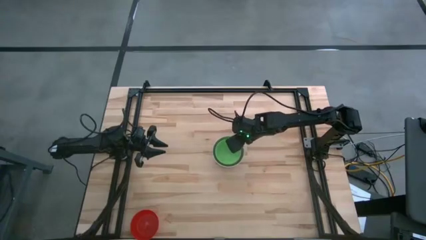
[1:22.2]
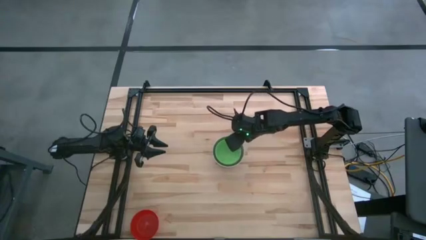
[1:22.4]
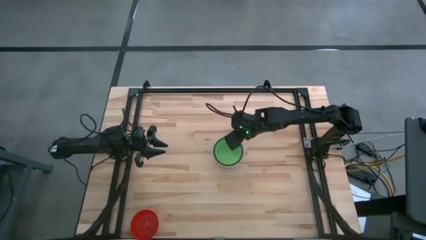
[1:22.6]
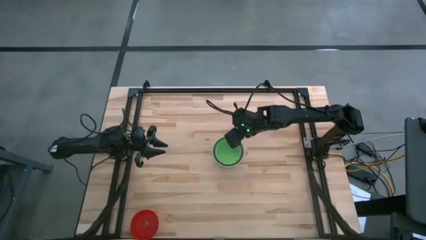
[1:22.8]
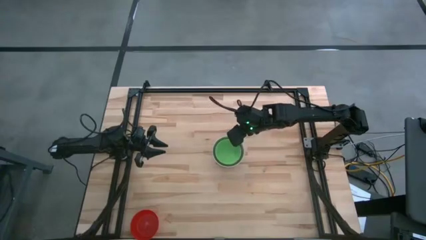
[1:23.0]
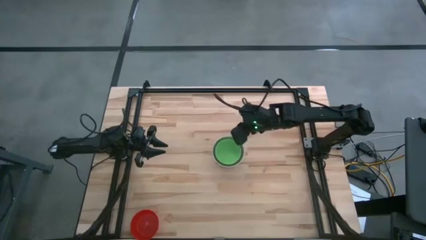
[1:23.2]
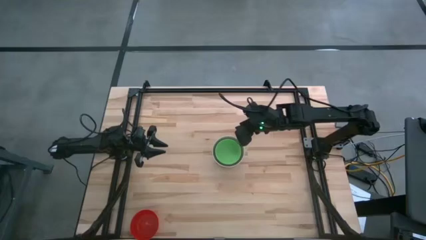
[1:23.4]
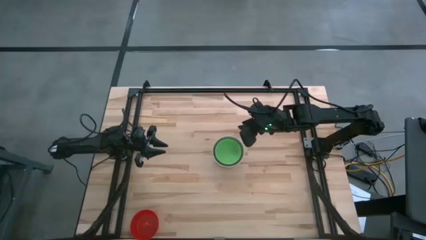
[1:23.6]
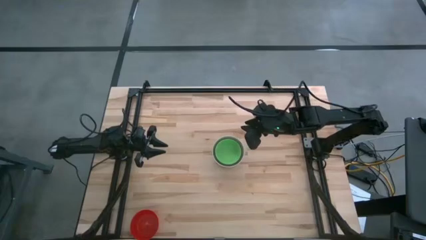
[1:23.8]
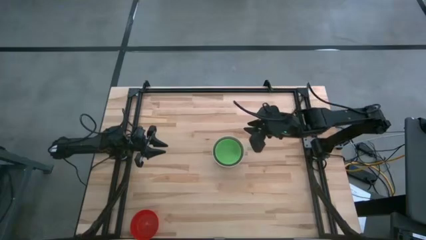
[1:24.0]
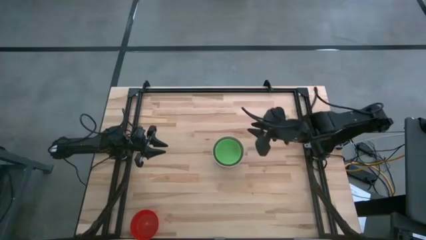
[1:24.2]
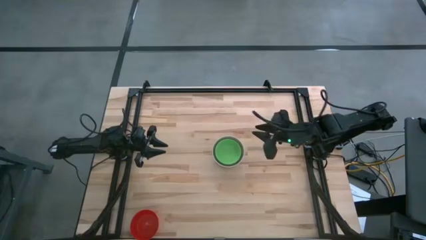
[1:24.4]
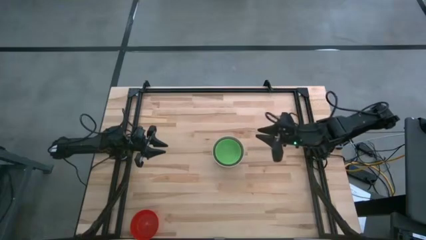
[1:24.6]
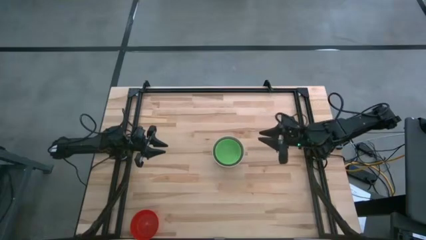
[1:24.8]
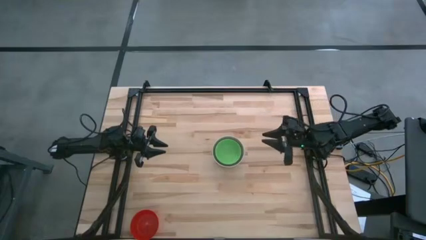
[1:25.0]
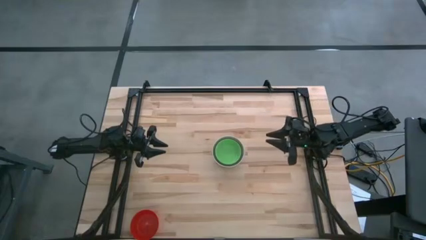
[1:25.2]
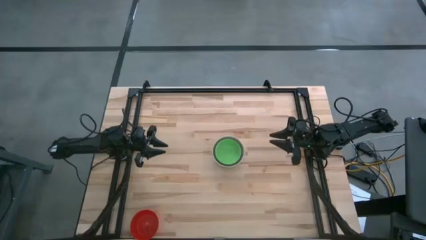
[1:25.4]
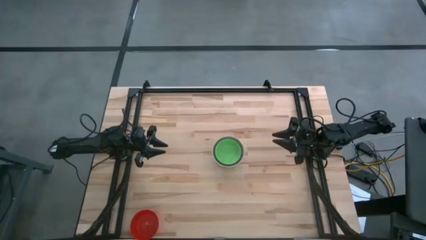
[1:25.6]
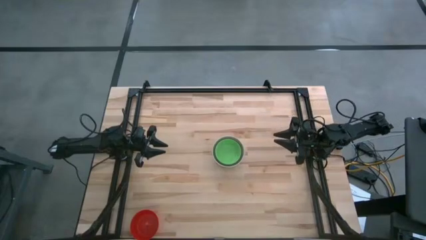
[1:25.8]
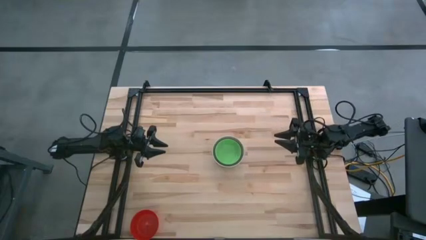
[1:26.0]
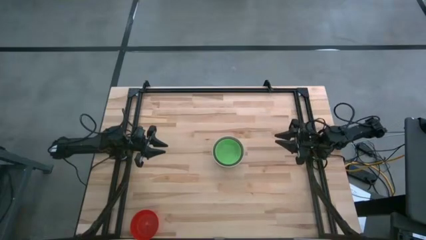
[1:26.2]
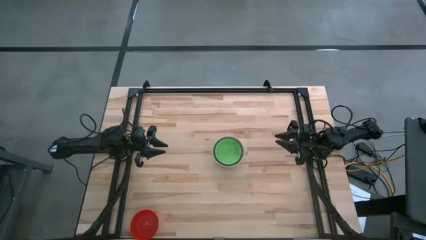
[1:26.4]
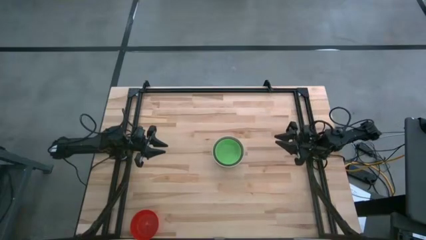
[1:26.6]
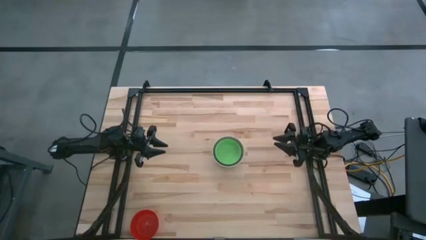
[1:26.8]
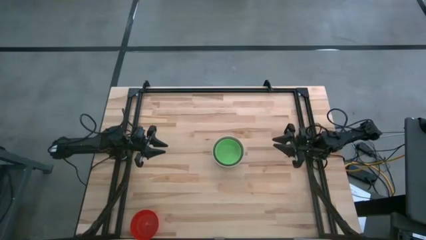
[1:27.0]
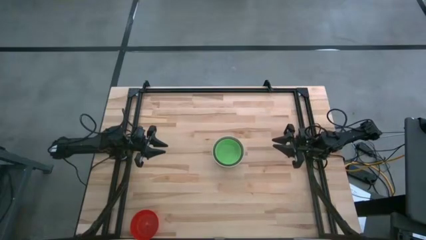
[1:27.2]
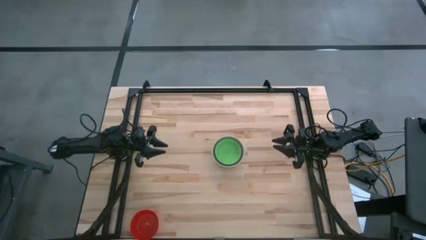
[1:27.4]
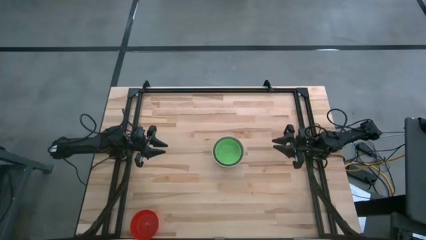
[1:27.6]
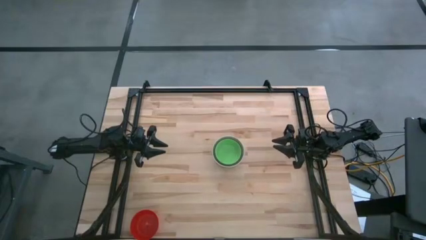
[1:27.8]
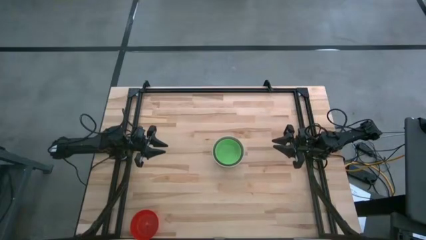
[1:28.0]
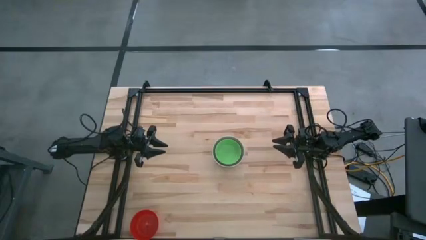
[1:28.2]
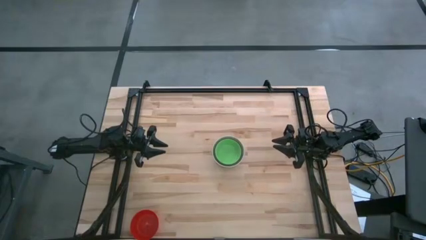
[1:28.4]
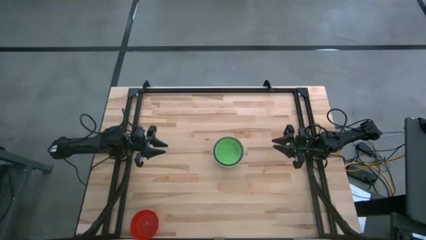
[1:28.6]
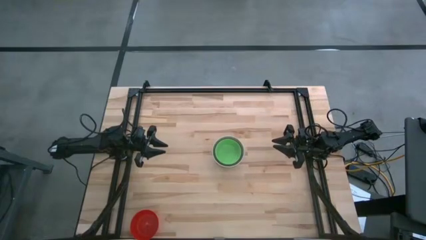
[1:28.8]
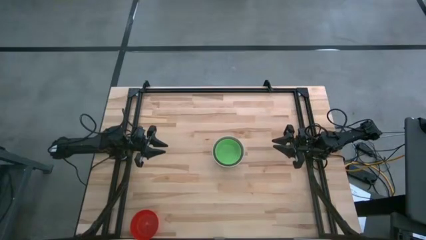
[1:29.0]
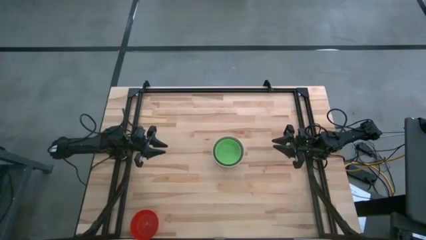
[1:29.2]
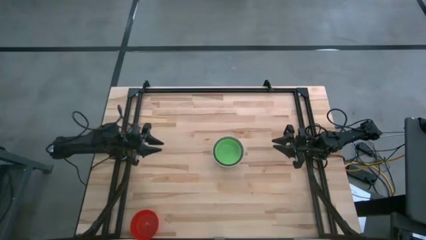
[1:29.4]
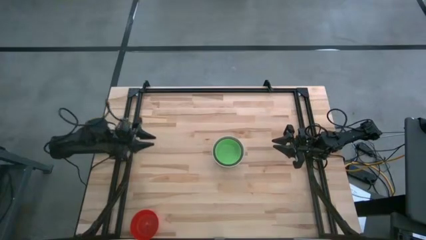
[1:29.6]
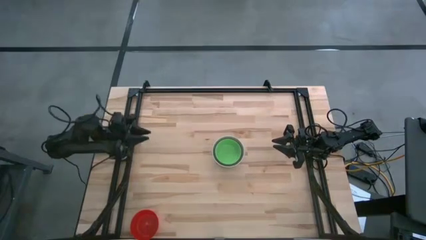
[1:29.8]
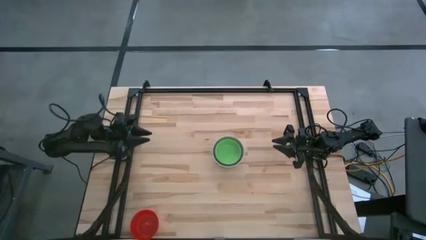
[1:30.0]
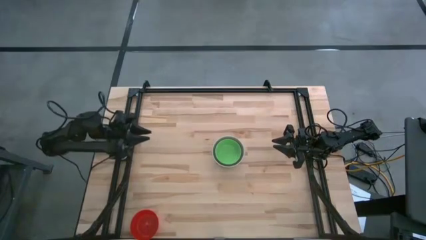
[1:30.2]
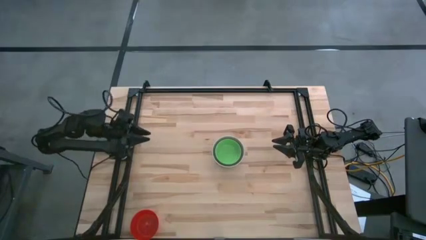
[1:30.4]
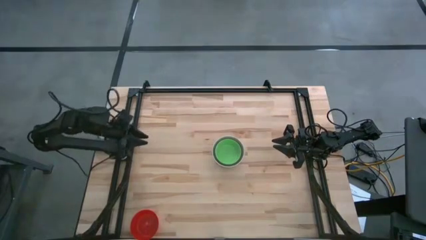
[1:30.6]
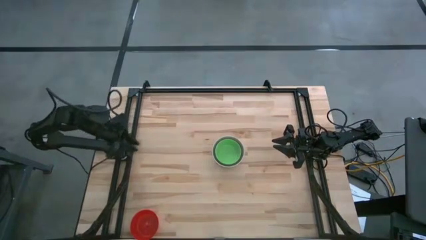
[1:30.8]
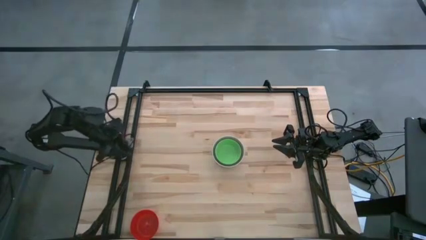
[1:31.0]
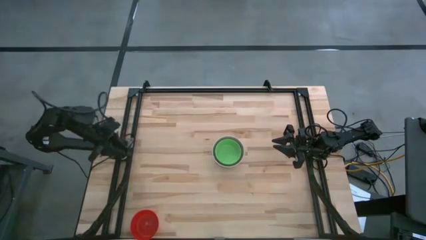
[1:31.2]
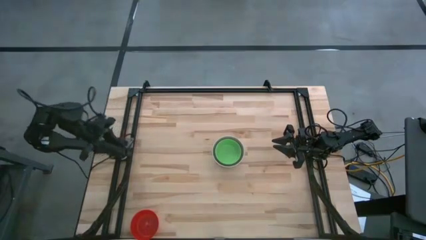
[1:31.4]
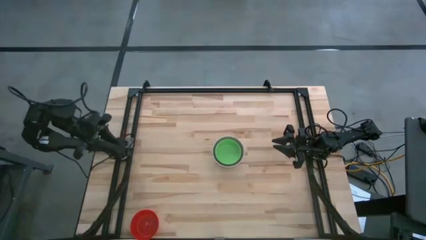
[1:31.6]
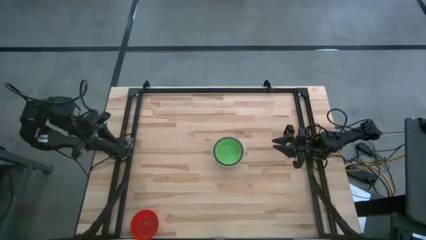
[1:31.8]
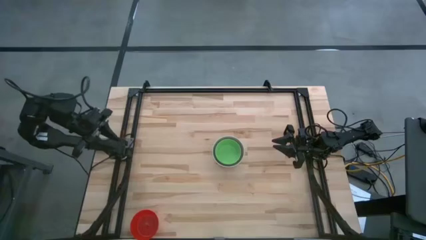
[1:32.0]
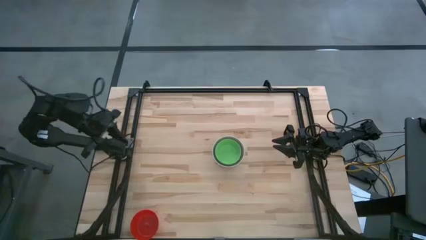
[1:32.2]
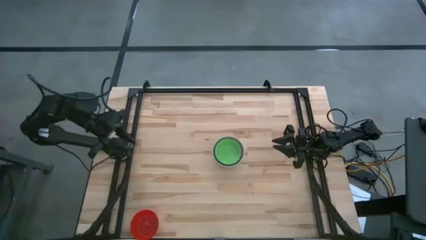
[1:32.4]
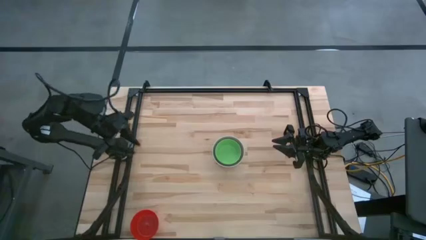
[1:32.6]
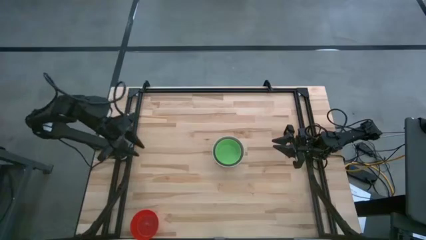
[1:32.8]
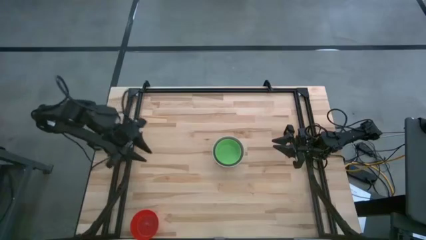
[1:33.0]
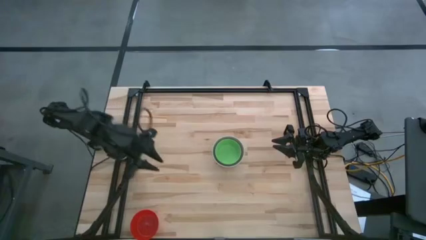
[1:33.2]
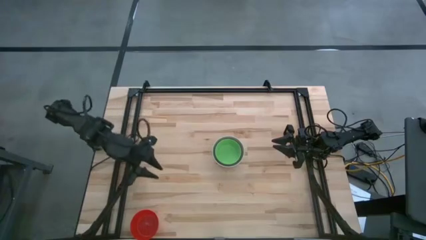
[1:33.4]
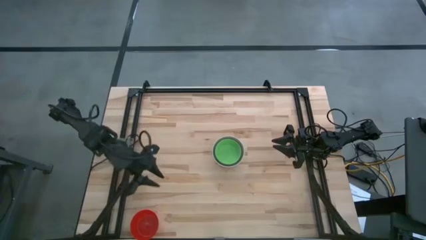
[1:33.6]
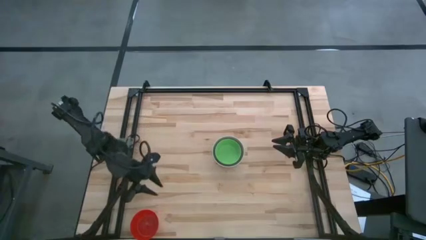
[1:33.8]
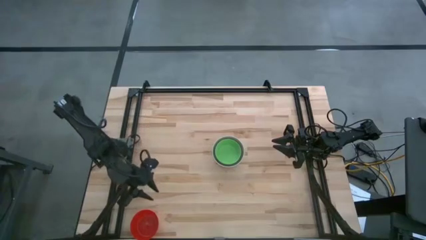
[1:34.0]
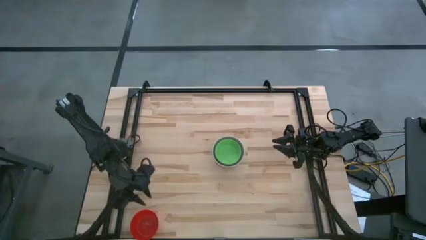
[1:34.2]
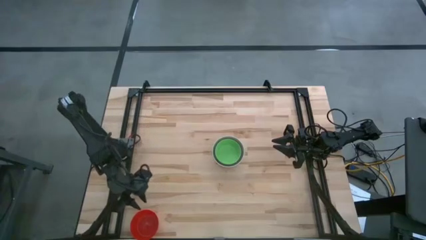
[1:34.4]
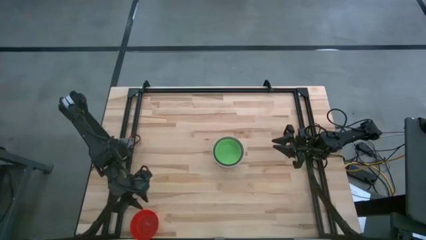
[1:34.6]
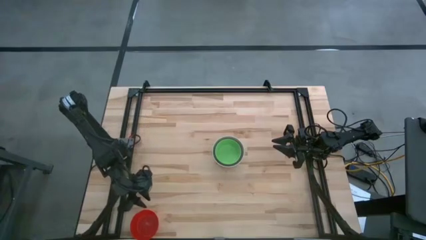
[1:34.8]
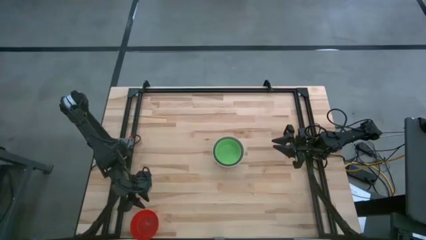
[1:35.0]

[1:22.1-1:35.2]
Stack the red bowl on top of the green bowl
